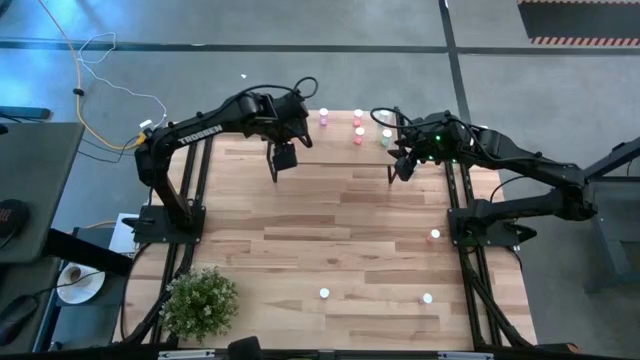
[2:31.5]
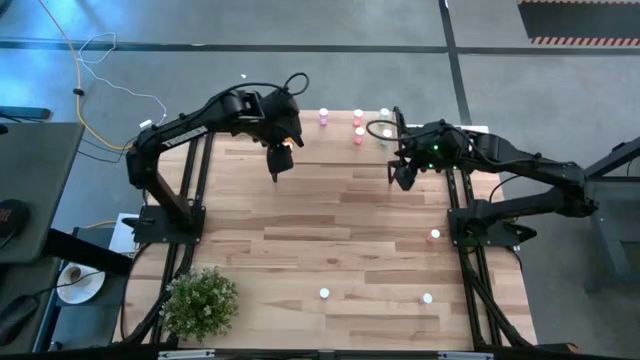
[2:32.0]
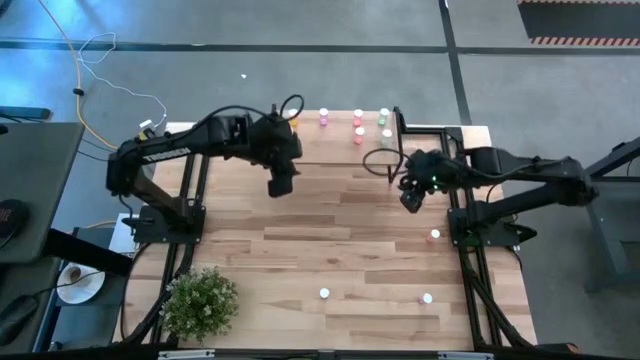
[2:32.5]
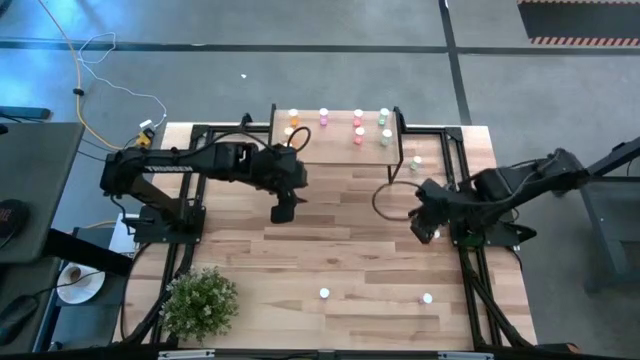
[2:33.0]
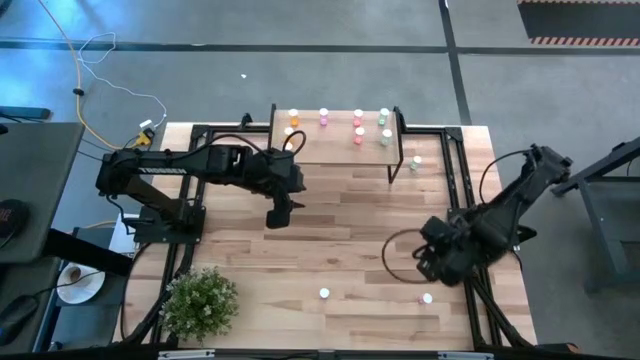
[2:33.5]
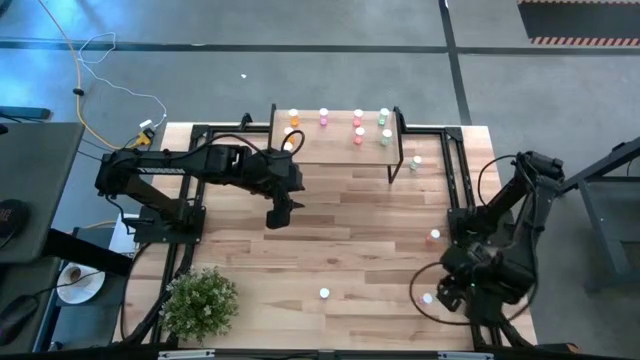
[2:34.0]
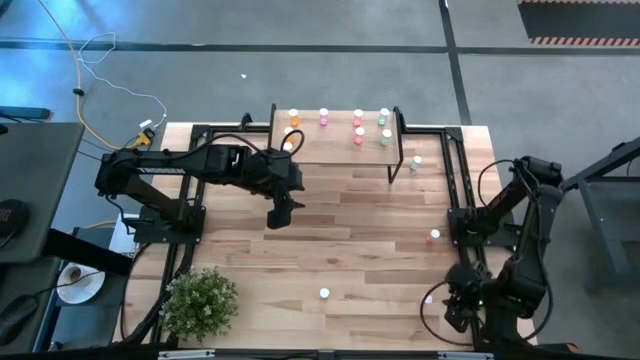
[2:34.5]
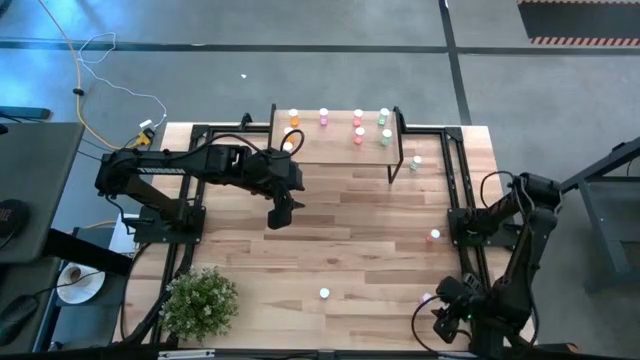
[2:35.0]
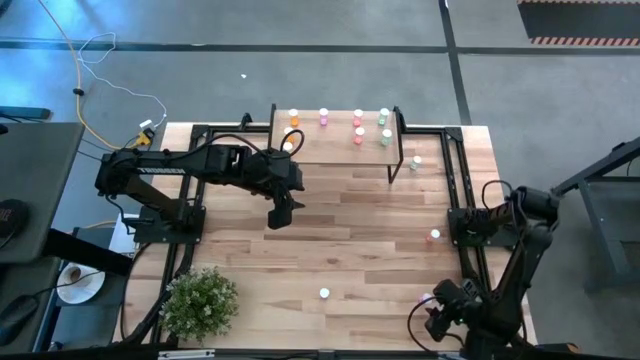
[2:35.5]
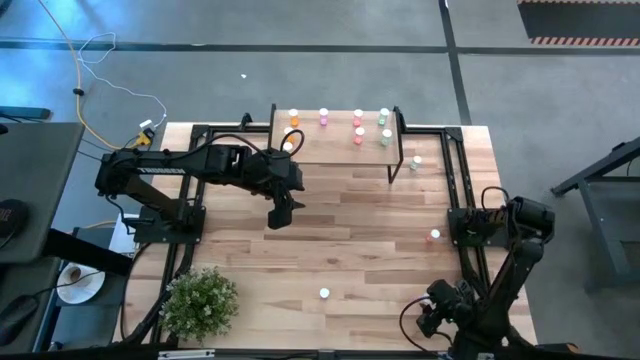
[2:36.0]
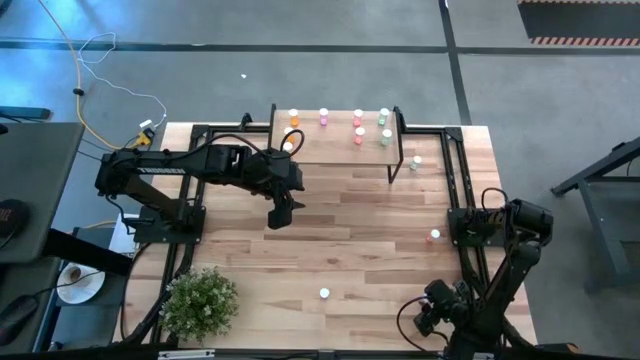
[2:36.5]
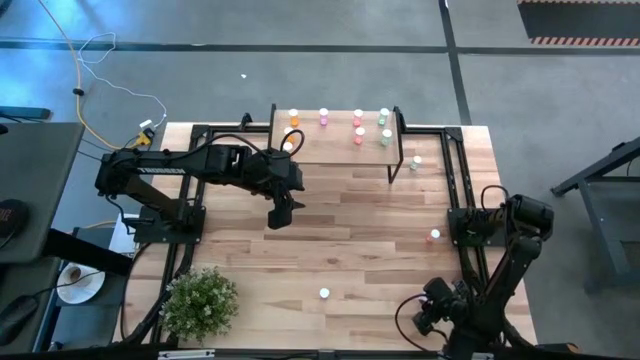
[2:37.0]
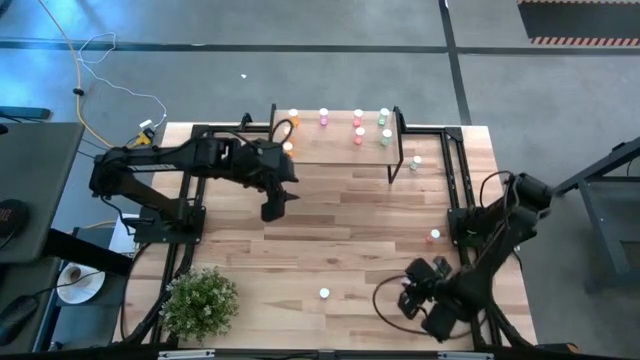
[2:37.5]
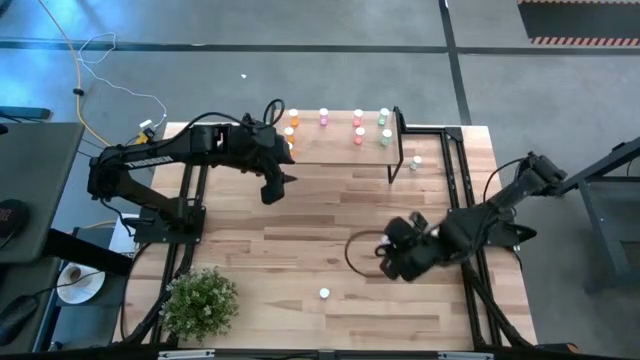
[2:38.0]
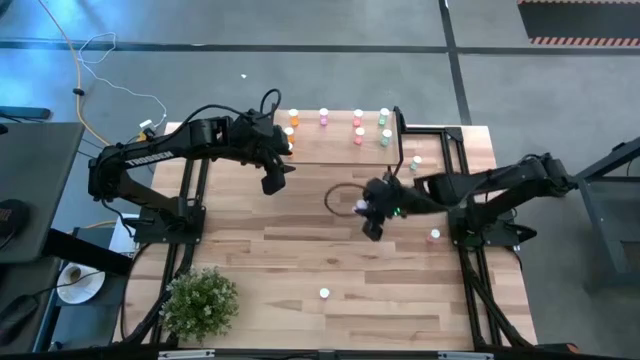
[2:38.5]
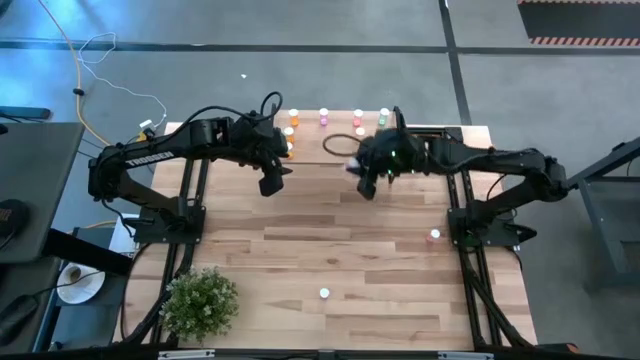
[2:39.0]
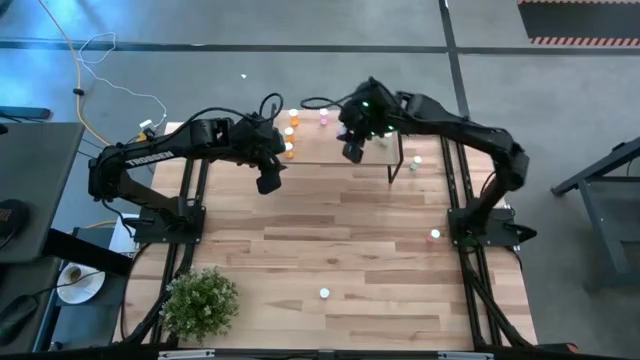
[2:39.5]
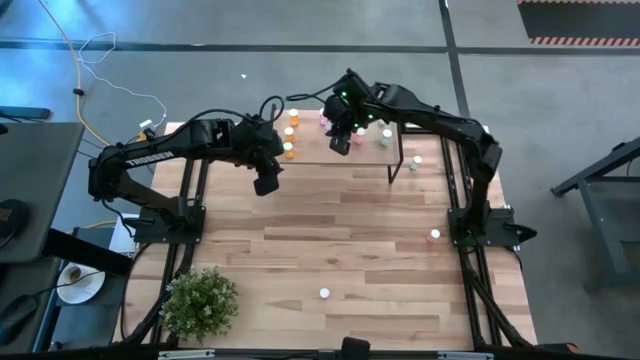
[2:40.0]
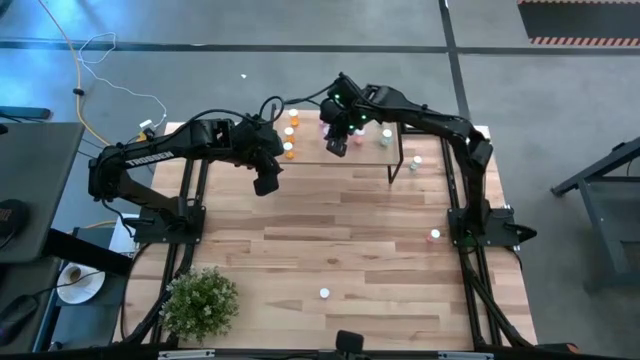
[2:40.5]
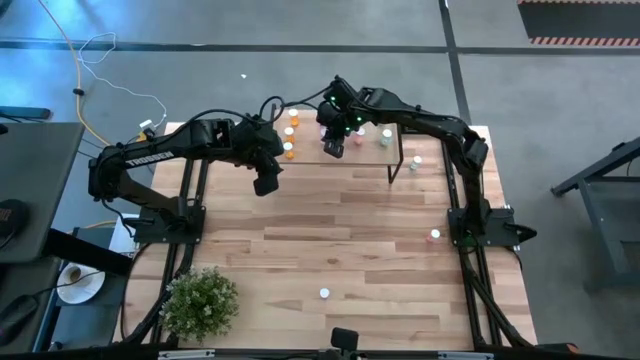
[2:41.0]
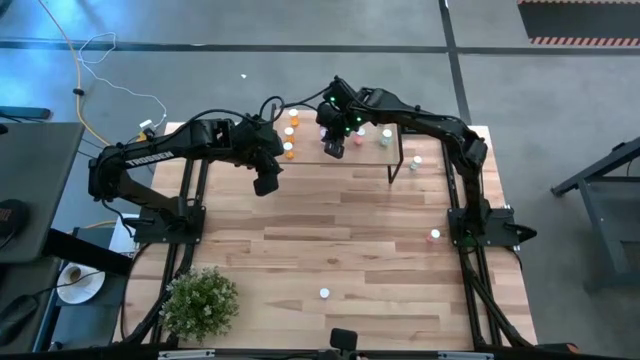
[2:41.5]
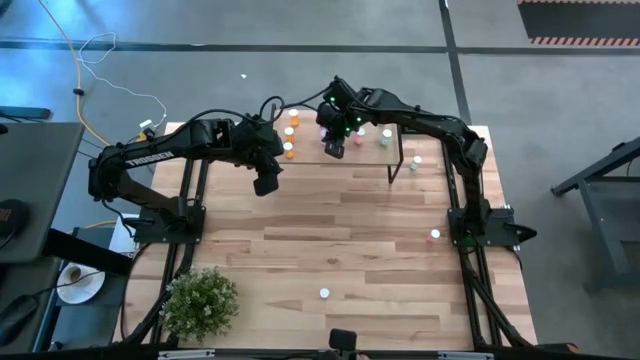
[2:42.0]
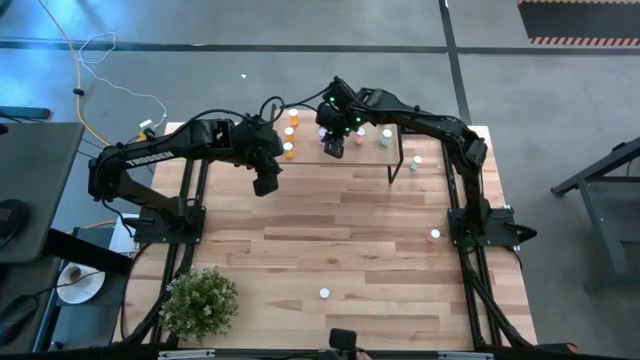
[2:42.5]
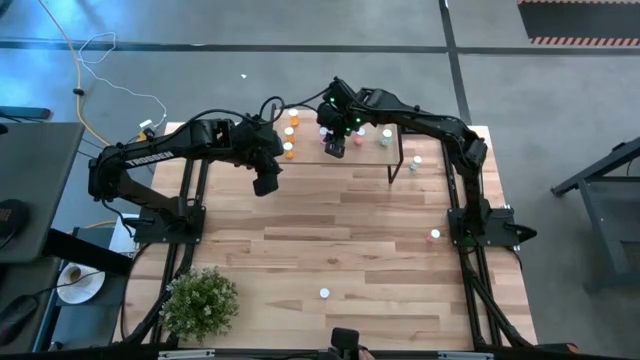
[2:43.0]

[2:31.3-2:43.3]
Task: Pick and place medicine bottles onto shelf by color
Put the right purple pill bottle on the shelf aligned with the other purple pill bottle

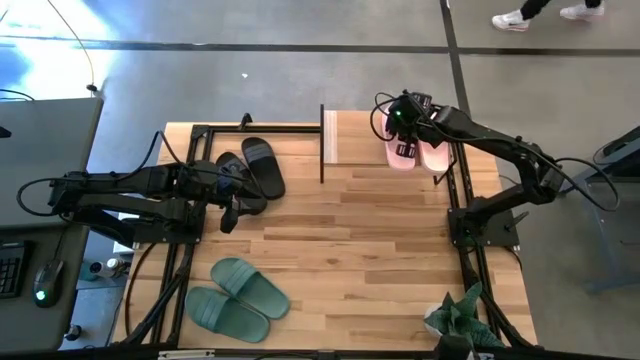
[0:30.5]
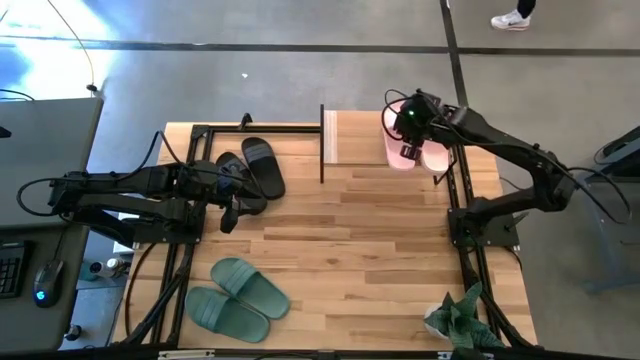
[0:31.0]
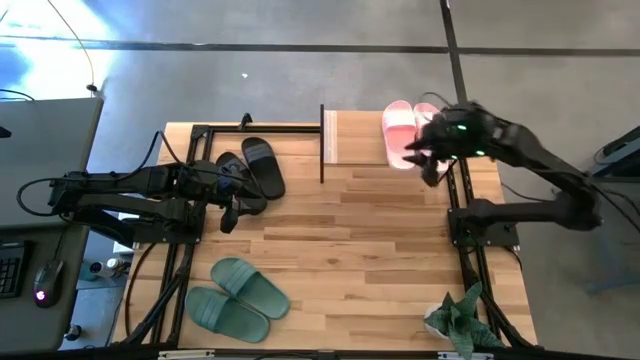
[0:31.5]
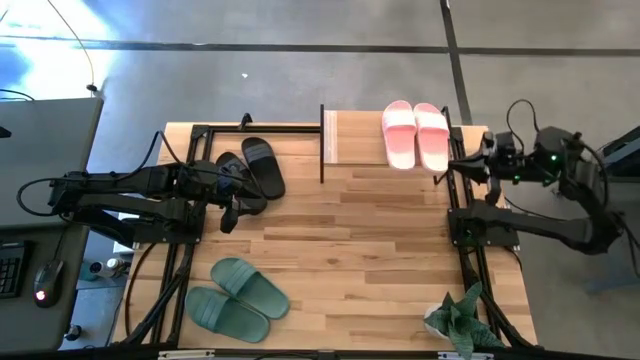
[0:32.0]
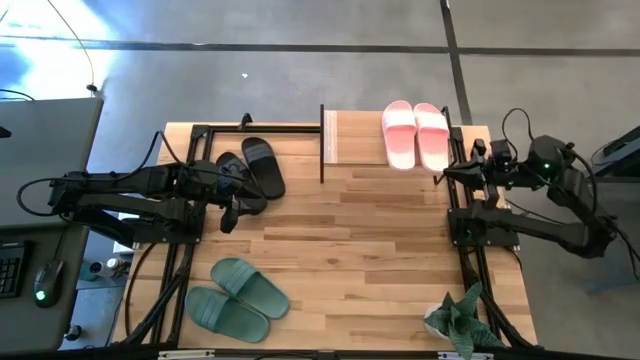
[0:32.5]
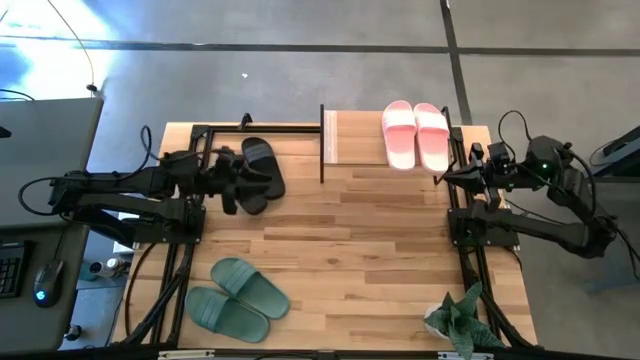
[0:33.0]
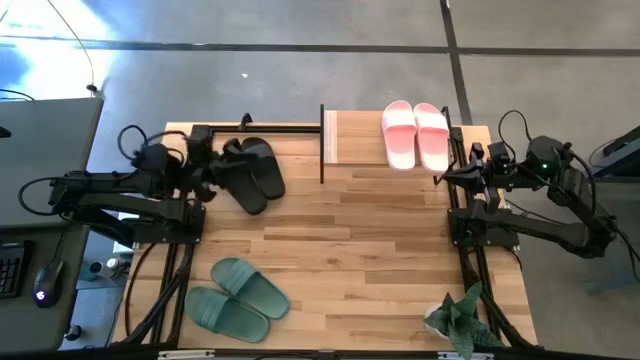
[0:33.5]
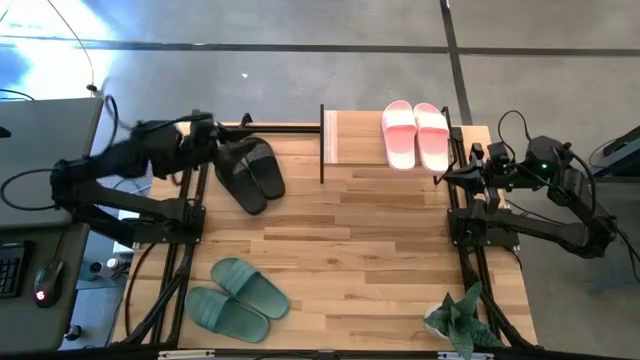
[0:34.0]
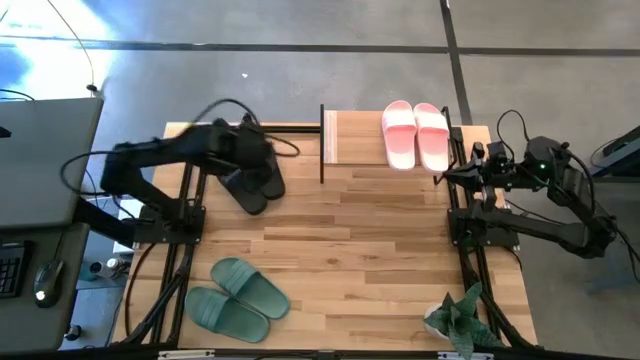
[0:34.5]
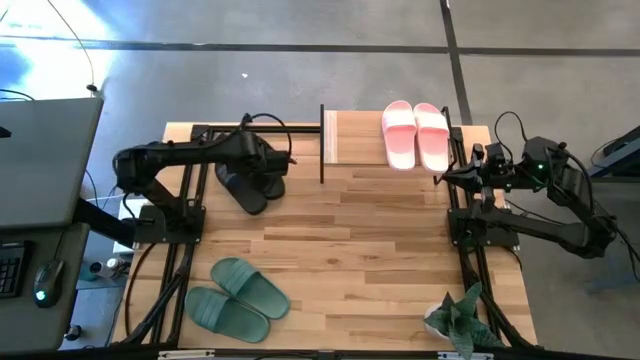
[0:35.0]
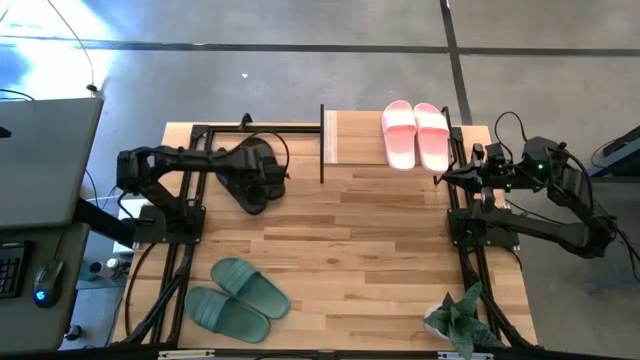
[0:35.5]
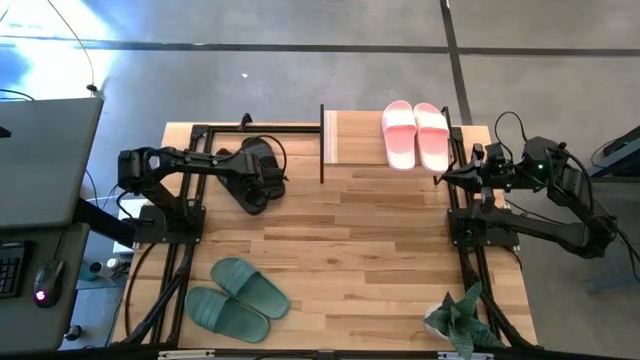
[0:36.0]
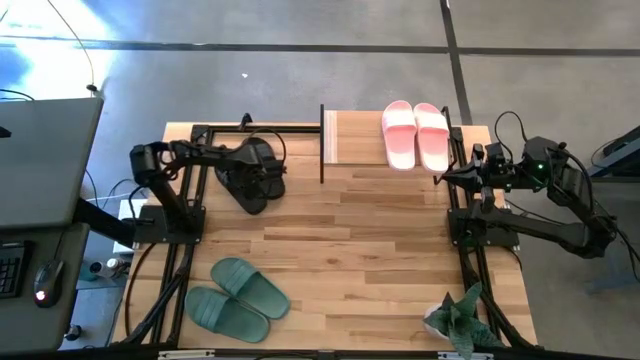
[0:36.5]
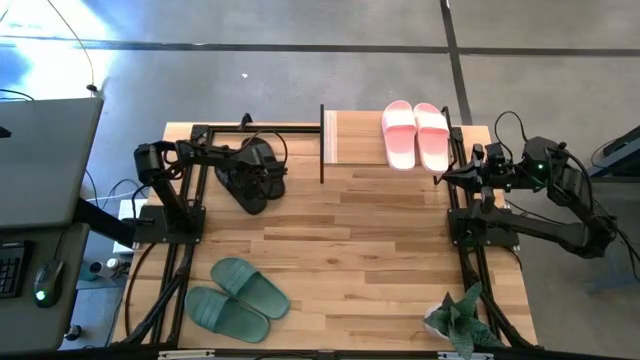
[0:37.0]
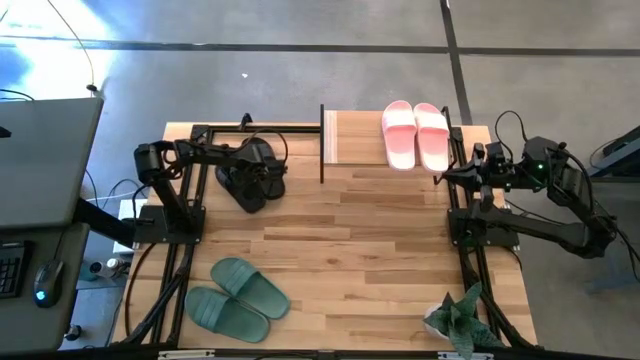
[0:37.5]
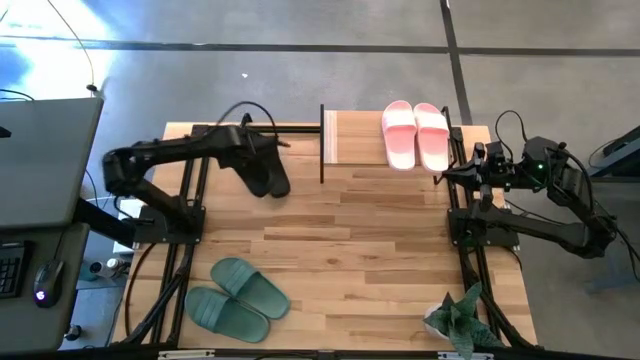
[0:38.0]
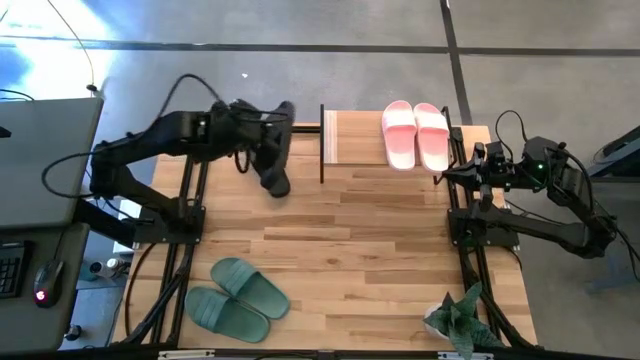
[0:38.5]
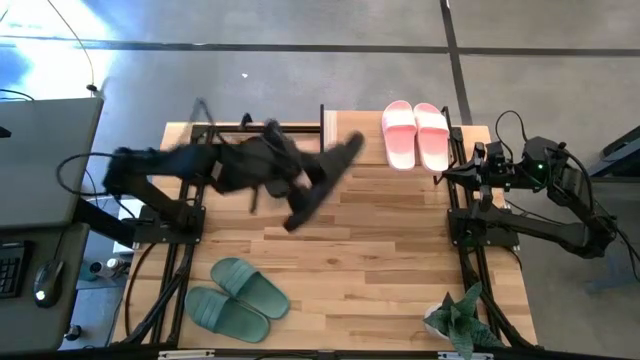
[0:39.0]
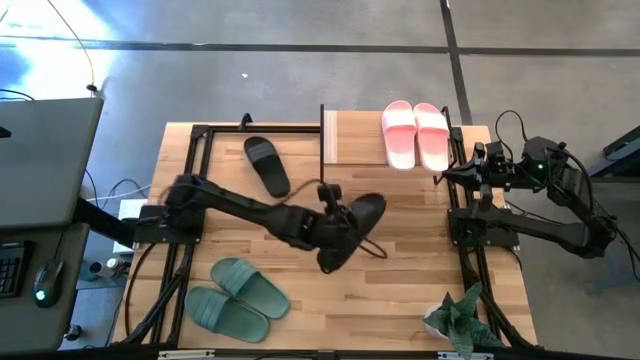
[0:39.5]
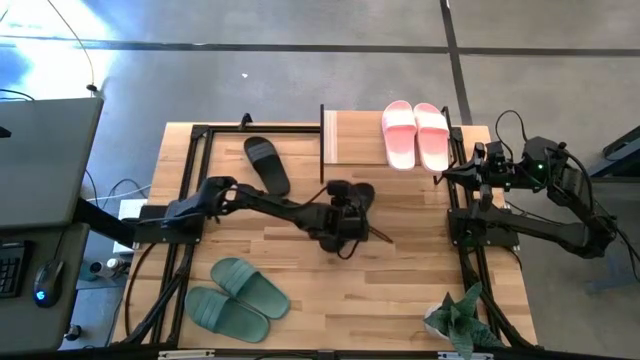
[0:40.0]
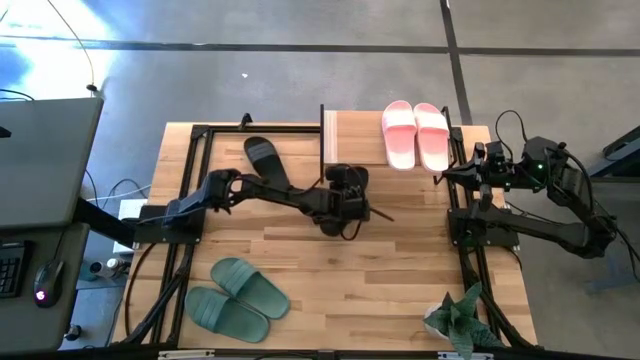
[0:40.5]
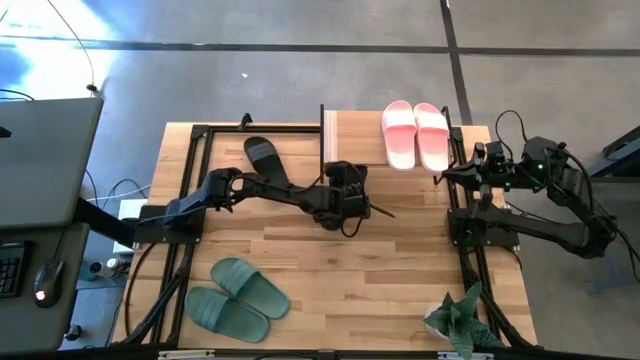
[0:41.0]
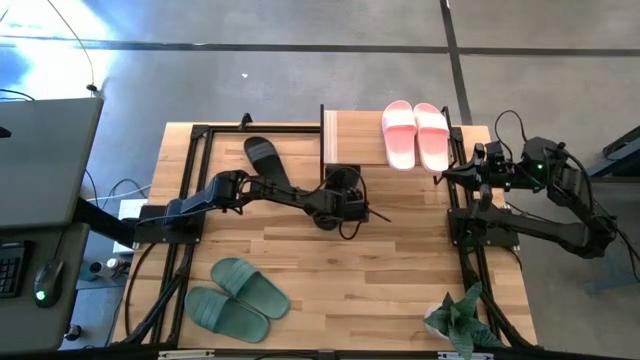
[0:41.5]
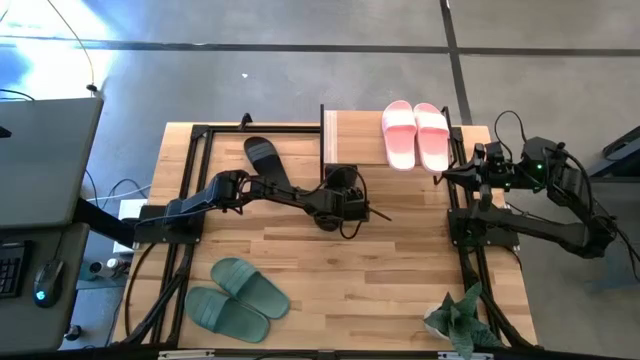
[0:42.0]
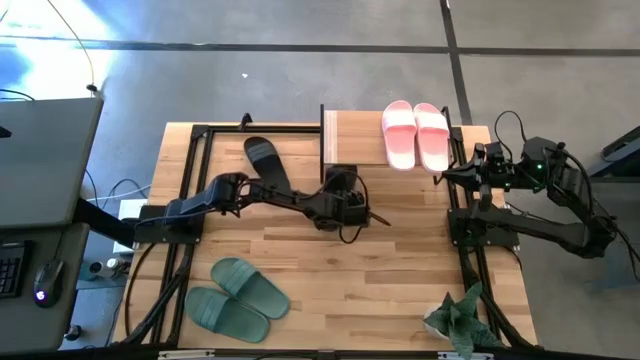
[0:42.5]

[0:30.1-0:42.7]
Task: Pick and place slides into the shelf
Move the left black slide in front of the shelf
